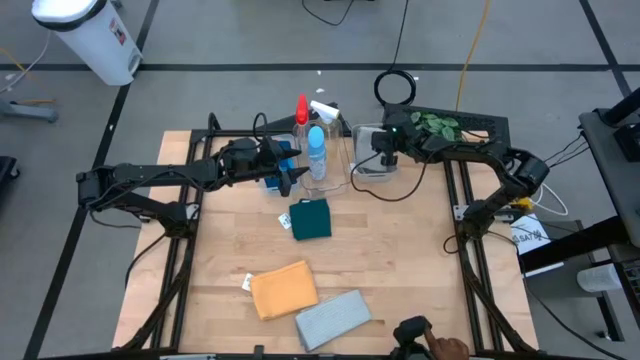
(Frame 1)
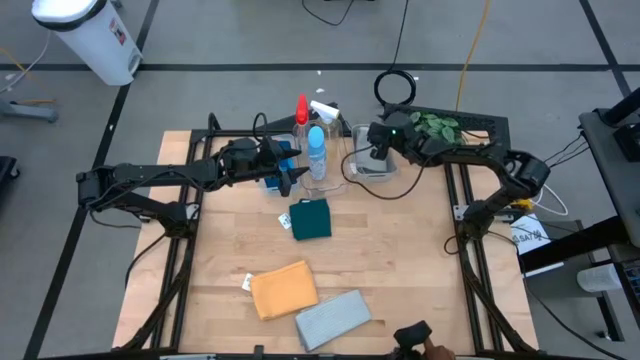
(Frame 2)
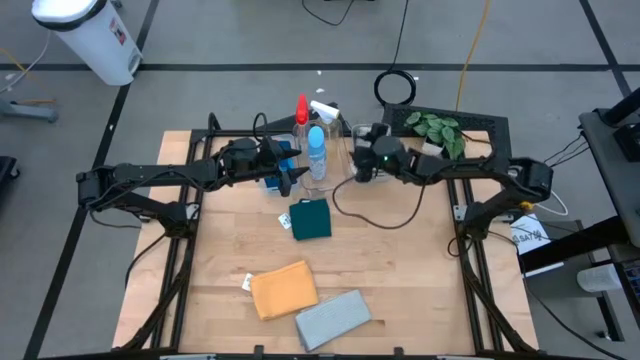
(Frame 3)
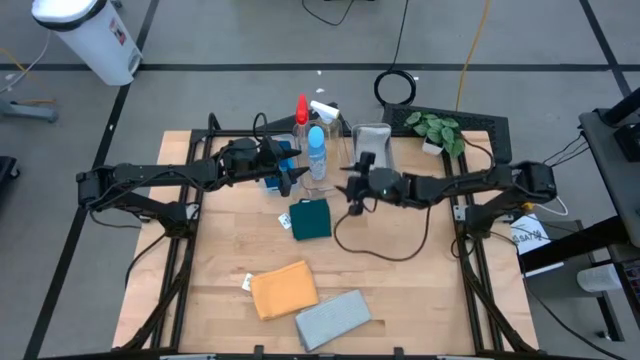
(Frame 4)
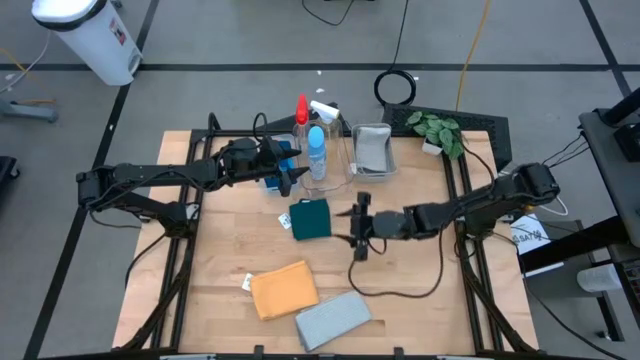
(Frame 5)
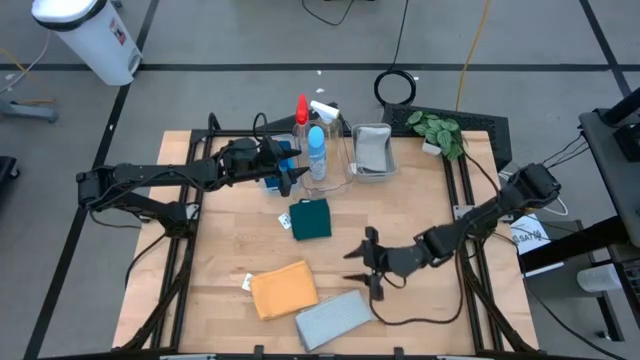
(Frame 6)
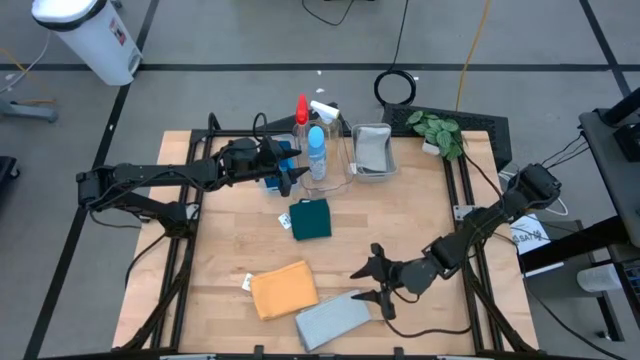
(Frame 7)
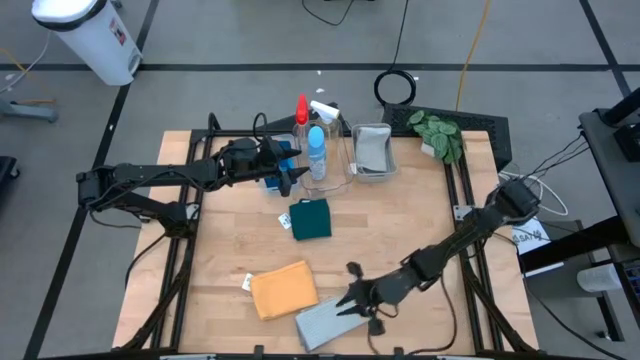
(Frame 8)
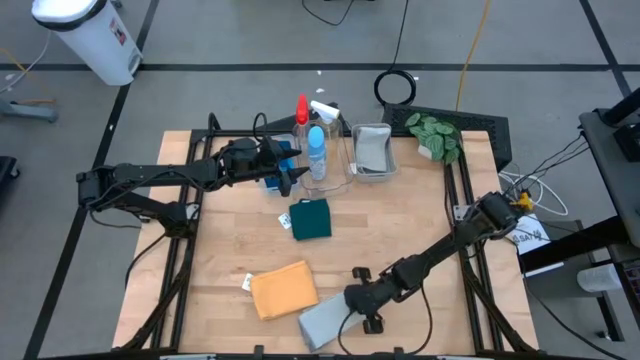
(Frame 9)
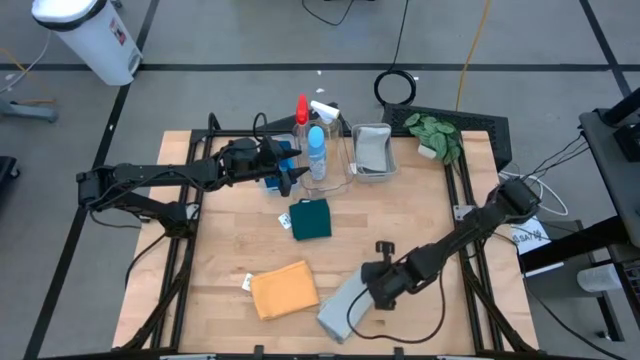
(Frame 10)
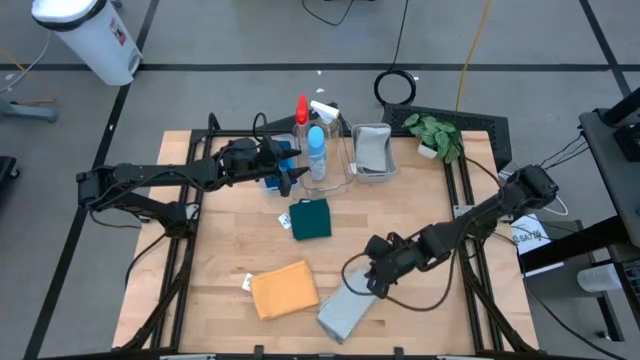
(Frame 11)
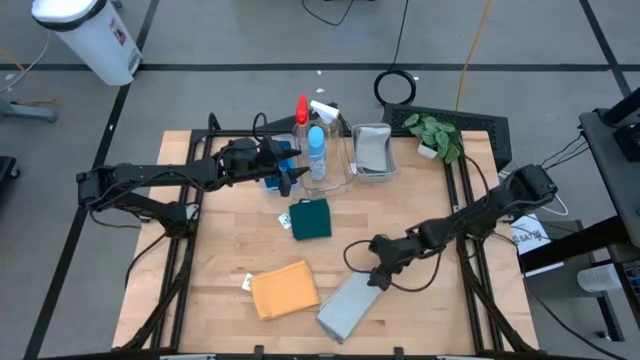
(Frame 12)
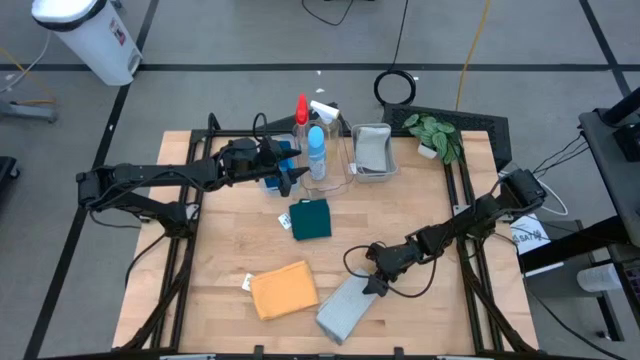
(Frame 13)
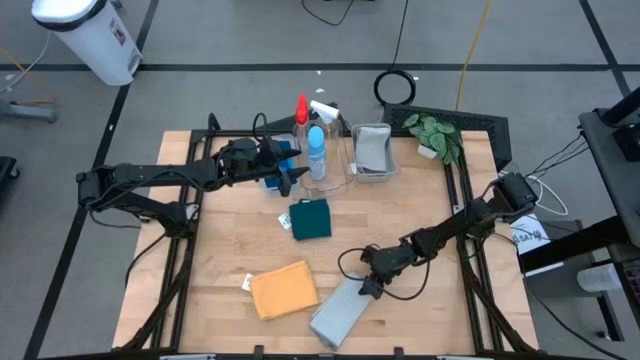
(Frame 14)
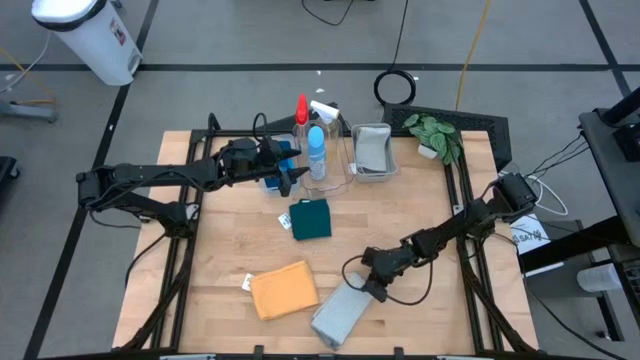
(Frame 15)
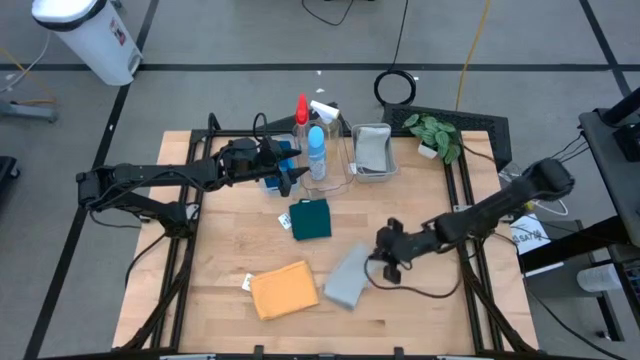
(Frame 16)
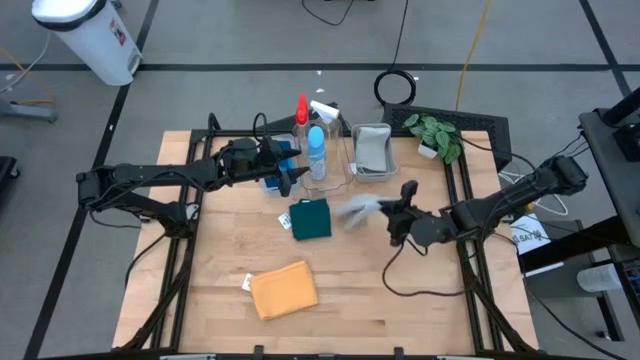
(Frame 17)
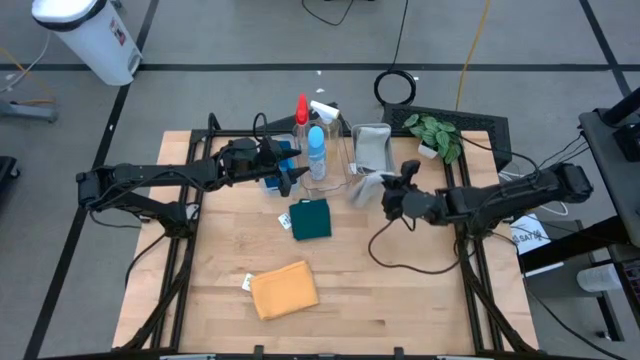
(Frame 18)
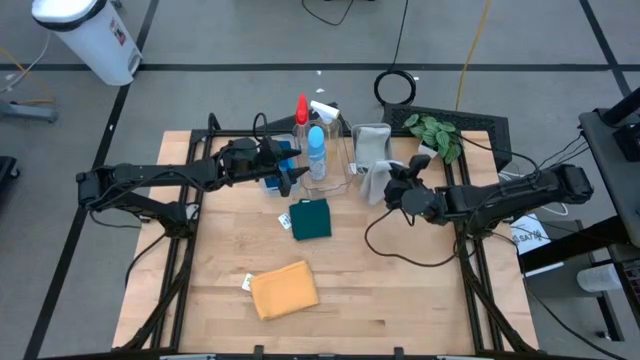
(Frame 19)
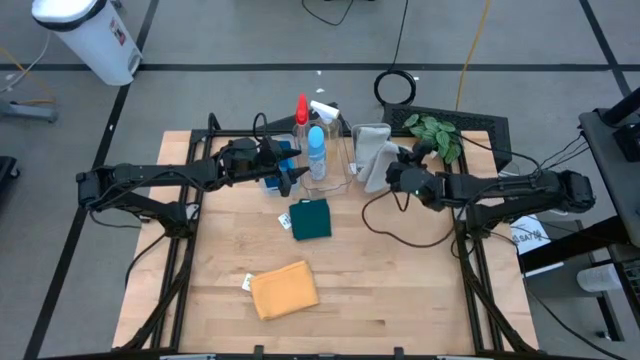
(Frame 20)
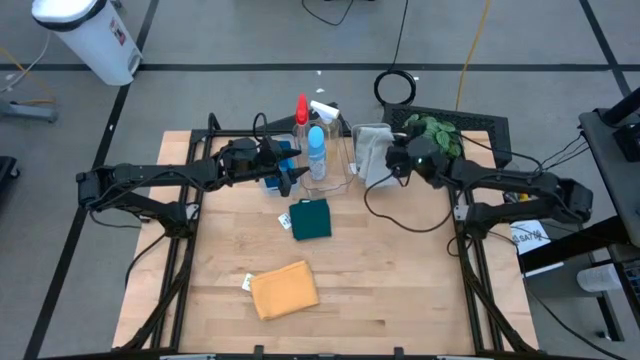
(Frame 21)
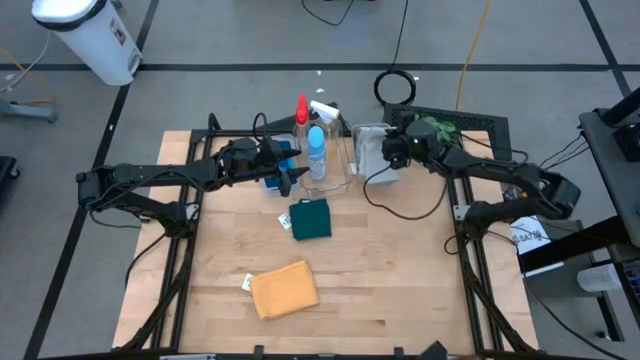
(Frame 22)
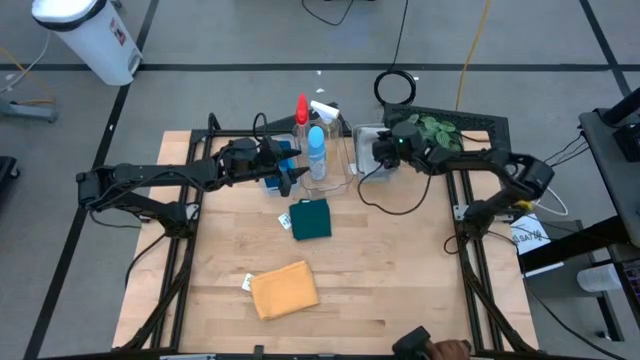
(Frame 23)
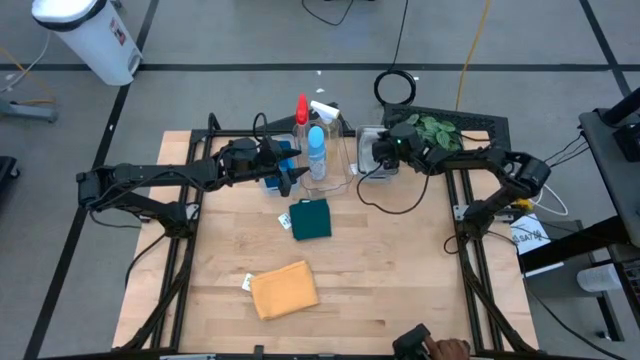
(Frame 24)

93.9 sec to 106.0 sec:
Task: Pick & Place Kitchen Items
Put the gray microfiber cloth into the gray bin

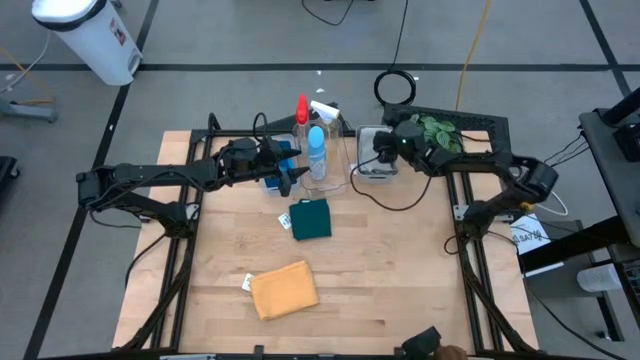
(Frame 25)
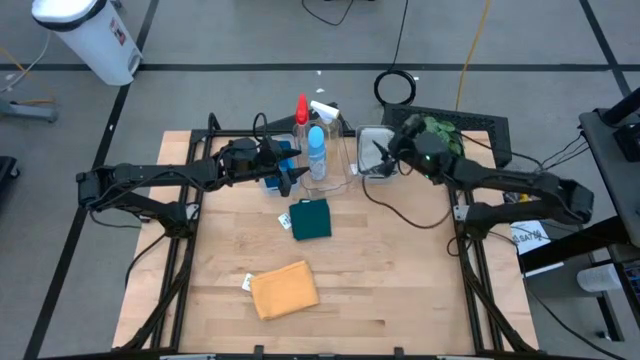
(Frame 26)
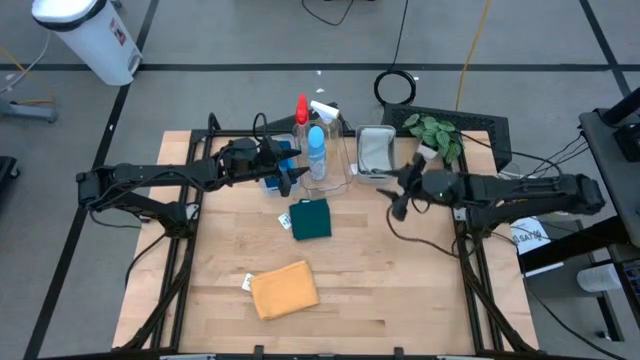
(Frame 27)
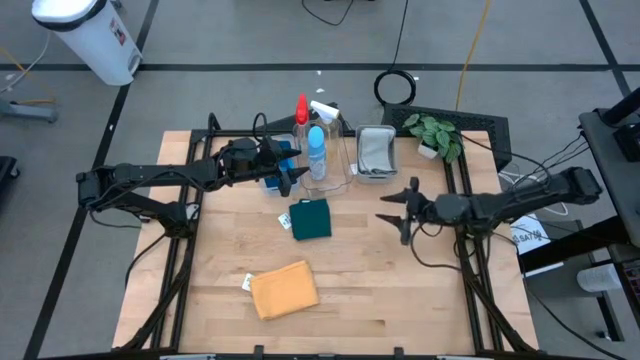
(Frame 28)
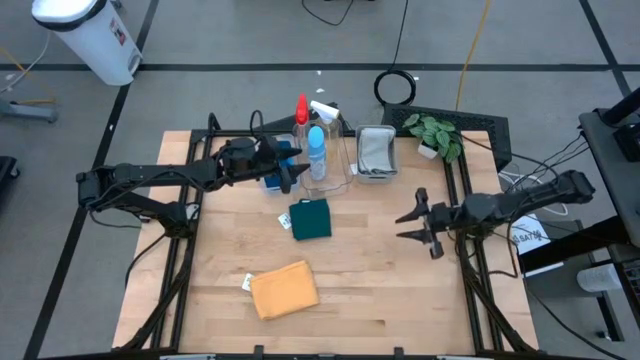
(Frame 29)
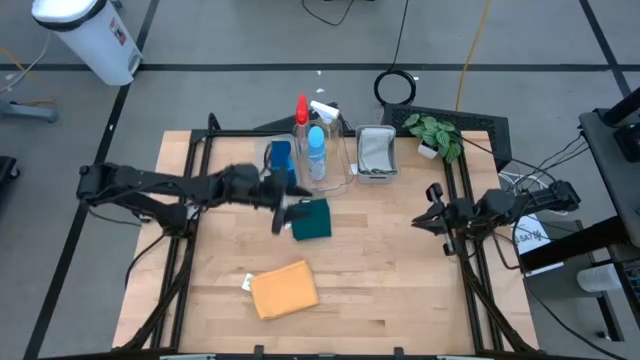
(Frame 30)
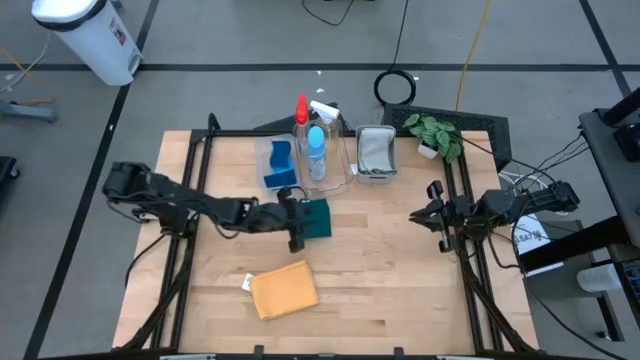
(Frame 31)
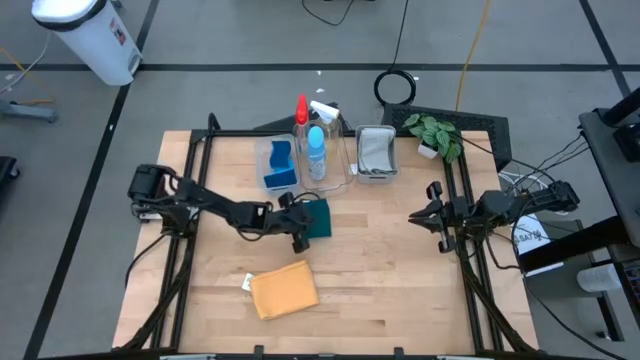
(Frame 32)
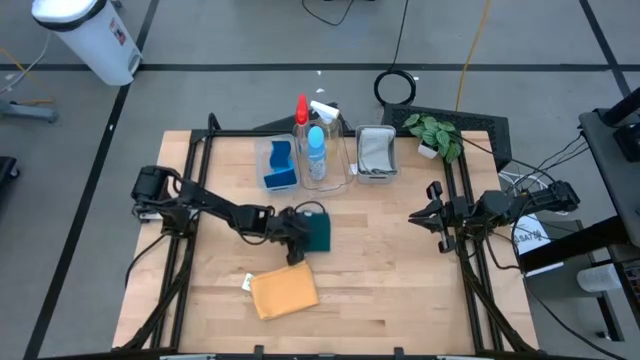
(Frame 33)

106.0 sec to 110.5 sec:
Adjust the dark blue microfiber cloth

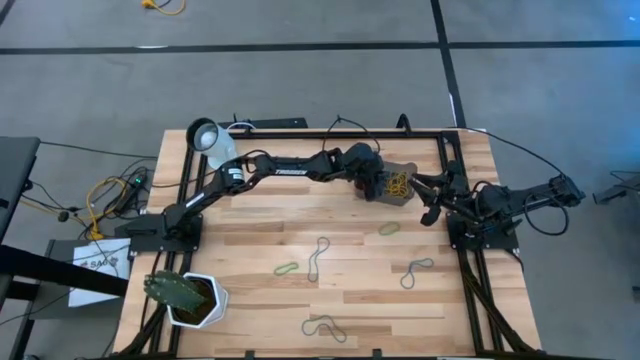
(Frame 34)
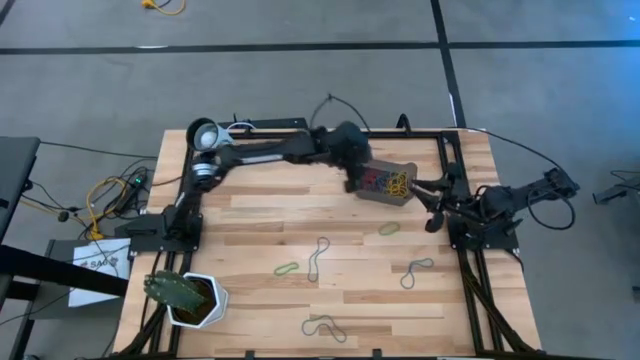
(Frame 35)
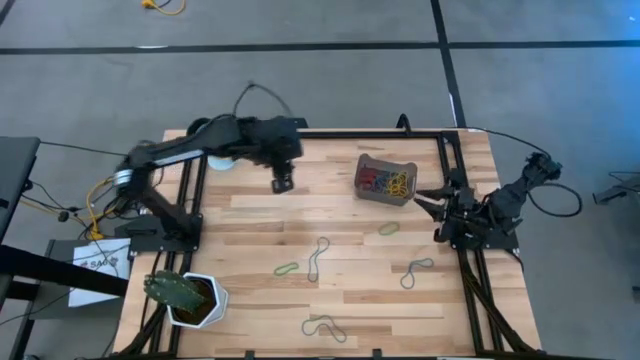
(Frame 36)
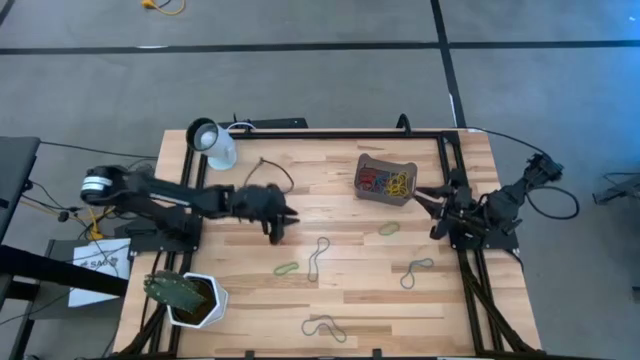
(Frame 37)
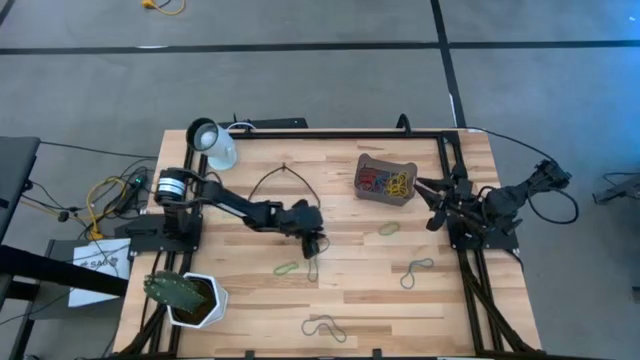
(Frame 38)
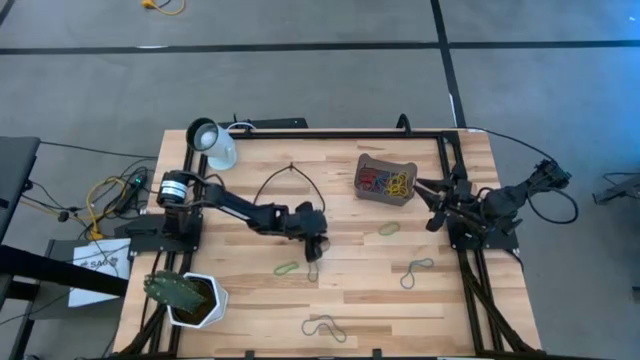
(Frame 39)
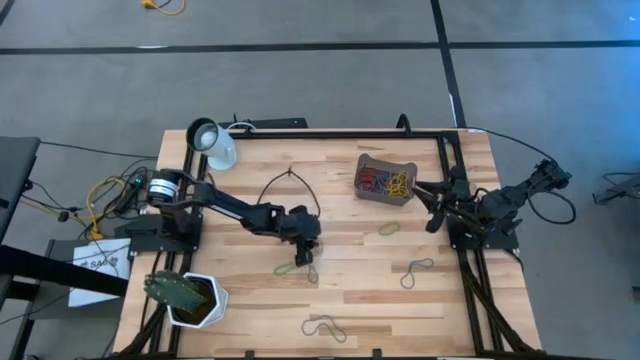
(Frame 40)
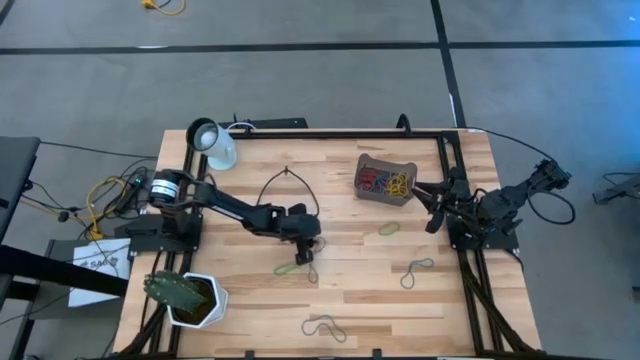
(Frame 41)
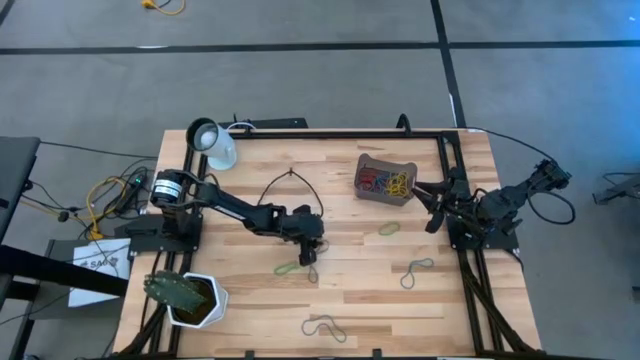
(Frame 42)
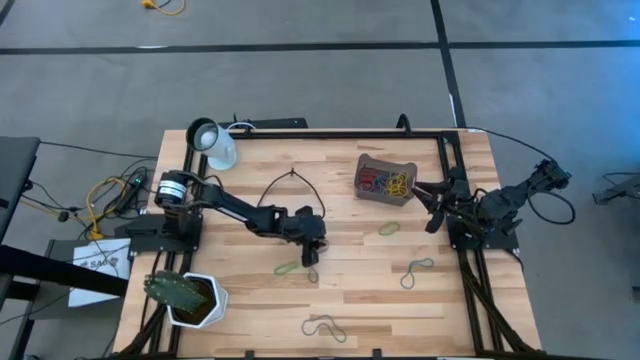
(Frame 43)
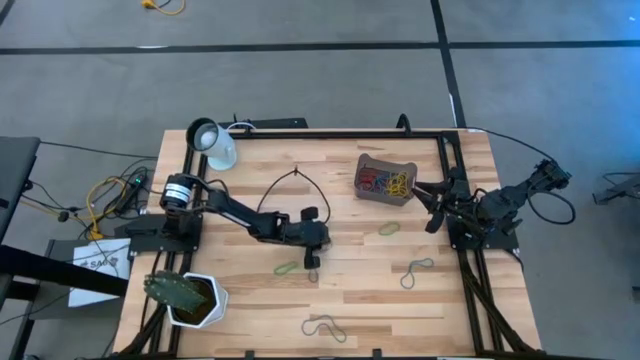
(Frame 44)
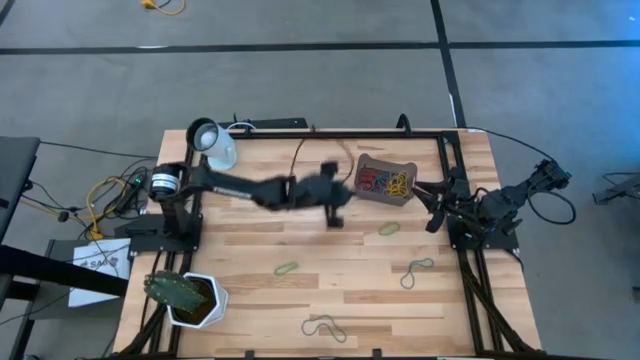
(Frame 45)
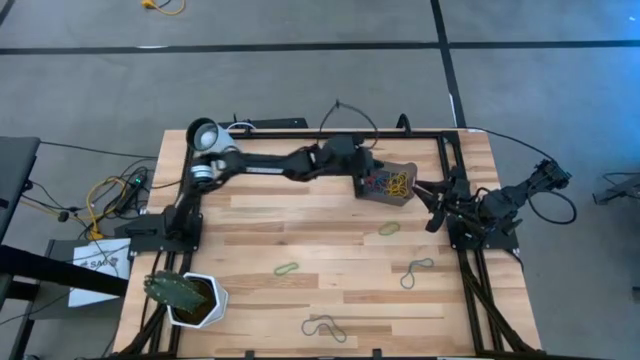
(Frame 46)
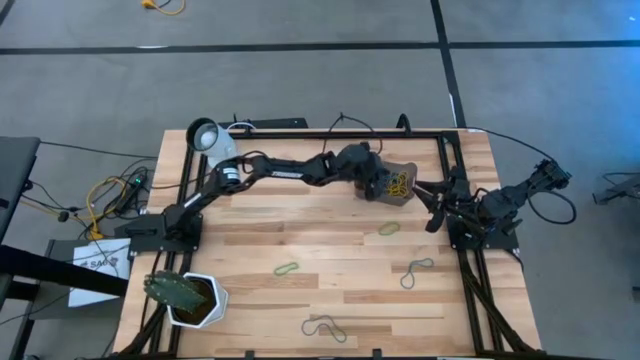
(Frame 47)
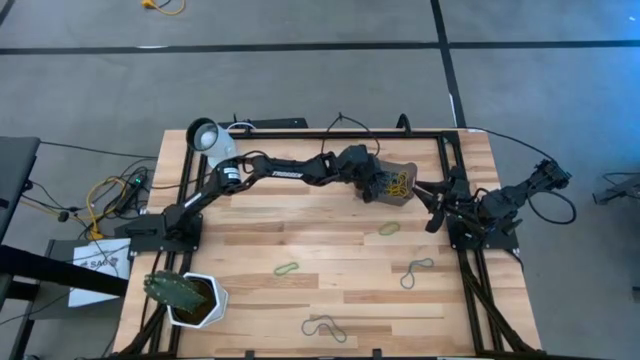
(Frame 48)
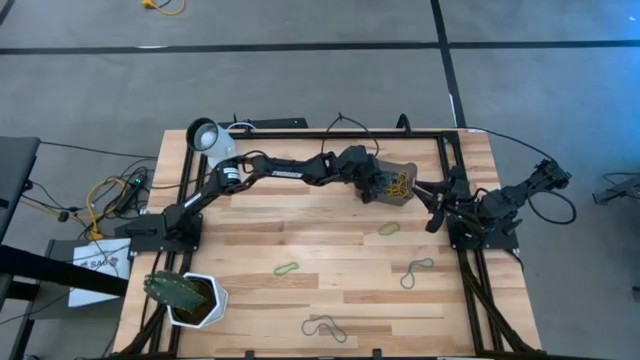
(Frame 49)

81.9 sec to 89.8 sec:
Task: Pick and place rubber bands into bin
Put the blue rubber band into the black container
